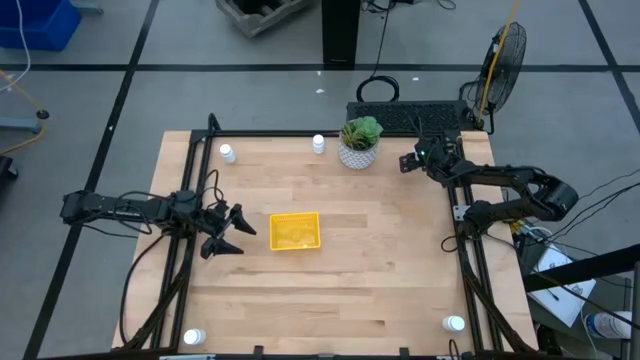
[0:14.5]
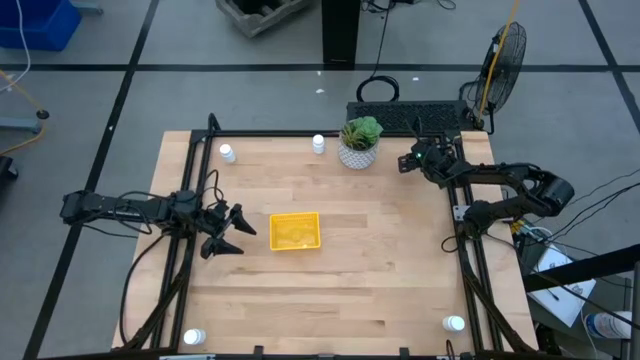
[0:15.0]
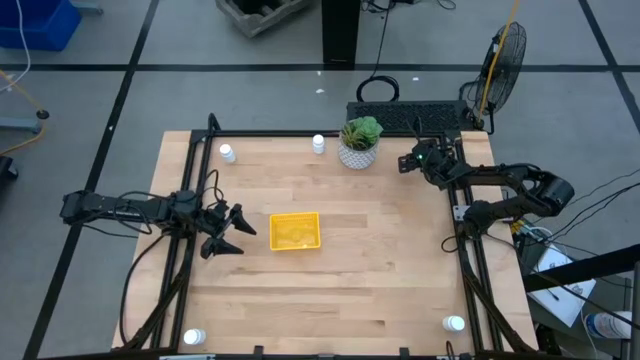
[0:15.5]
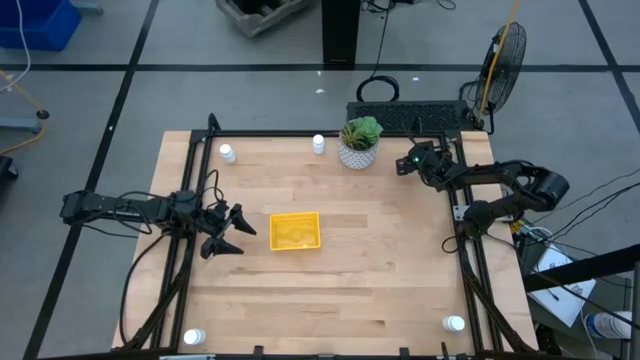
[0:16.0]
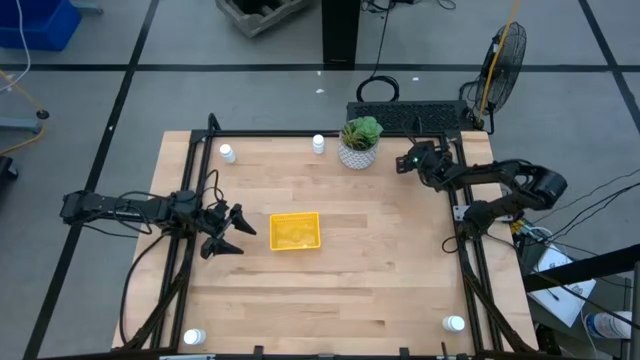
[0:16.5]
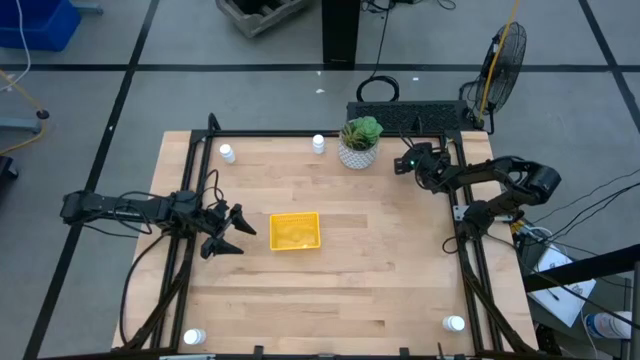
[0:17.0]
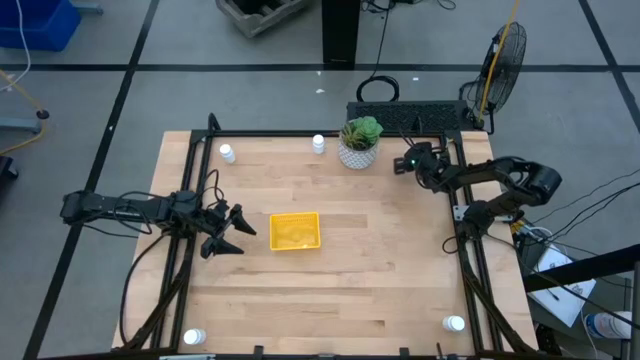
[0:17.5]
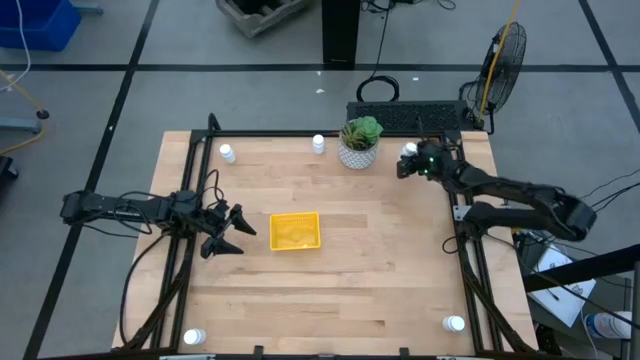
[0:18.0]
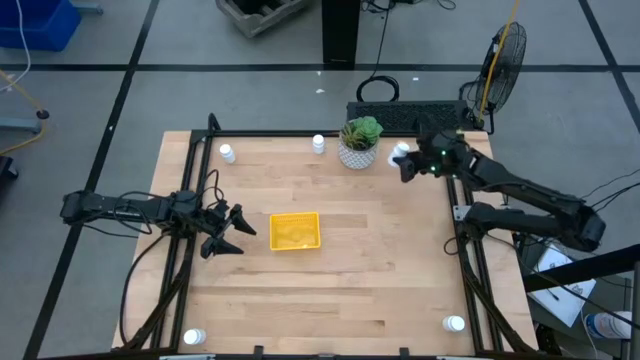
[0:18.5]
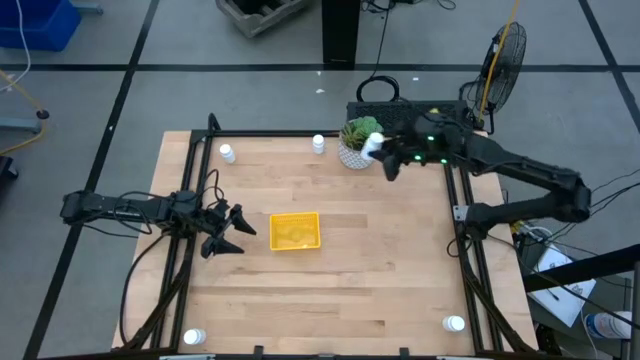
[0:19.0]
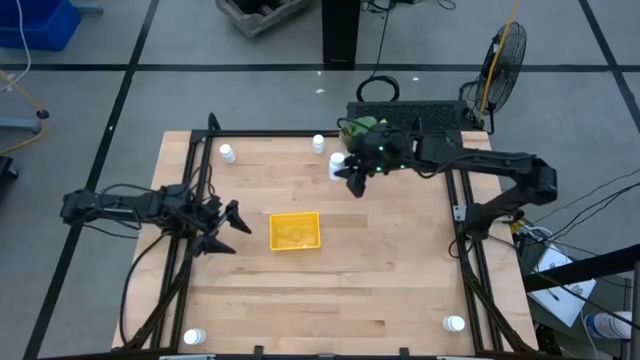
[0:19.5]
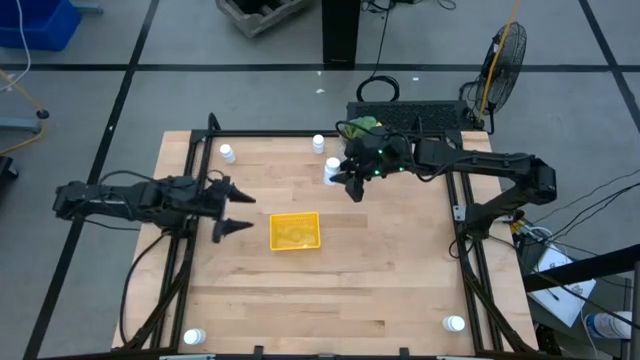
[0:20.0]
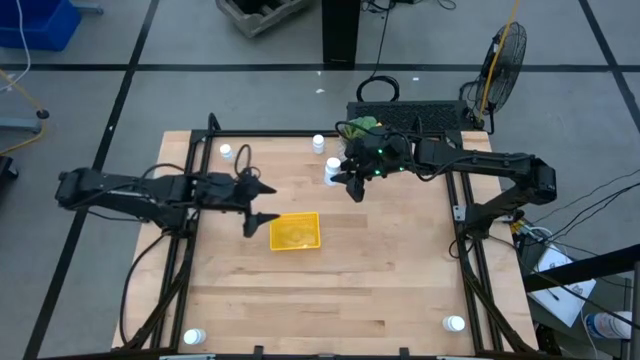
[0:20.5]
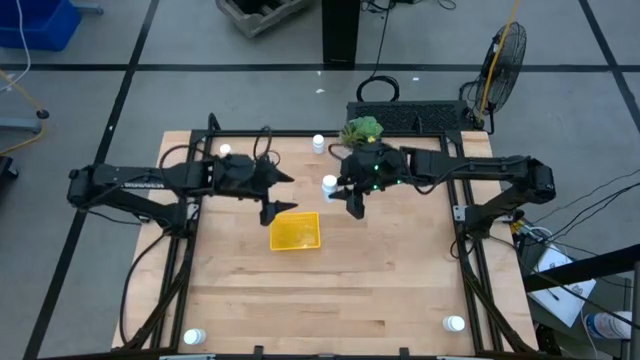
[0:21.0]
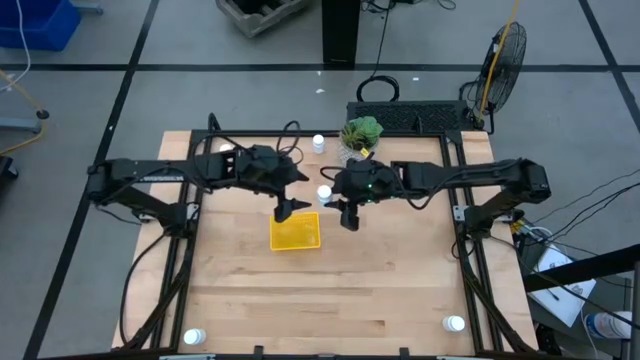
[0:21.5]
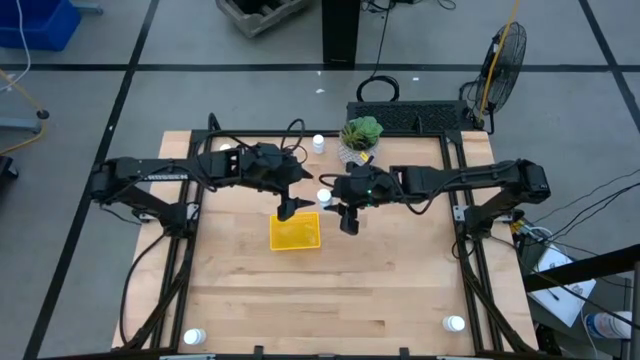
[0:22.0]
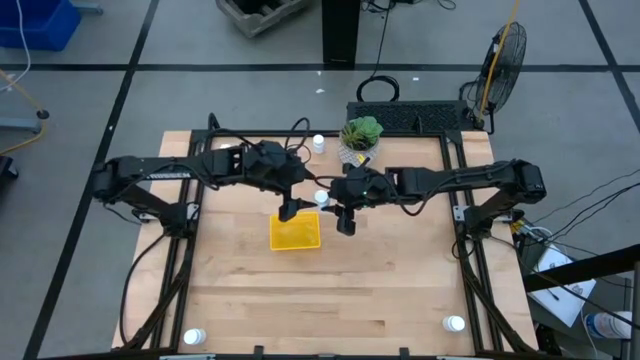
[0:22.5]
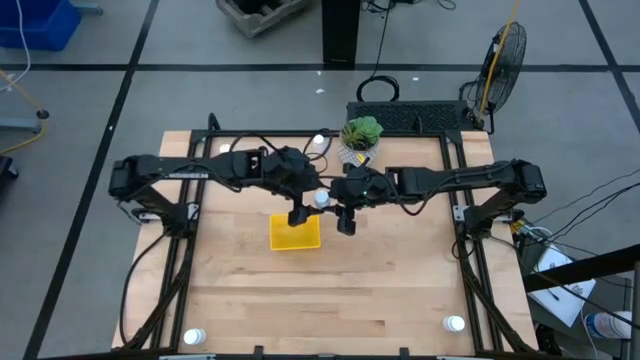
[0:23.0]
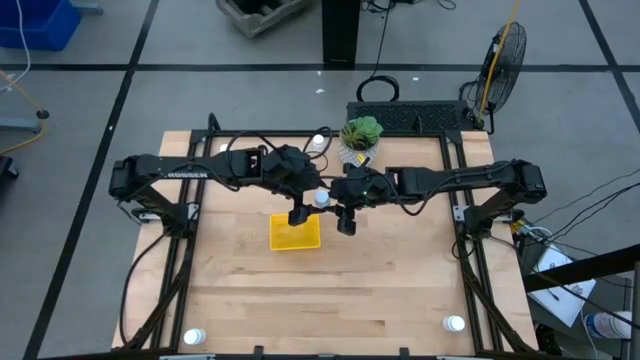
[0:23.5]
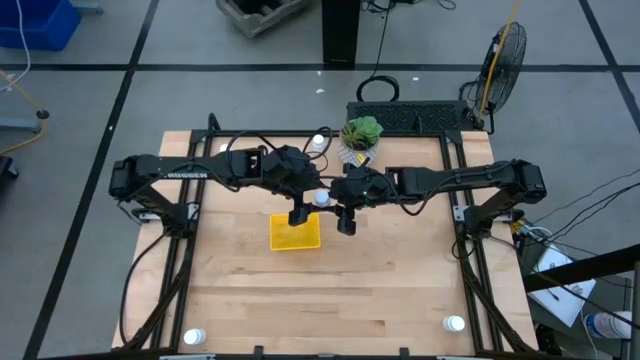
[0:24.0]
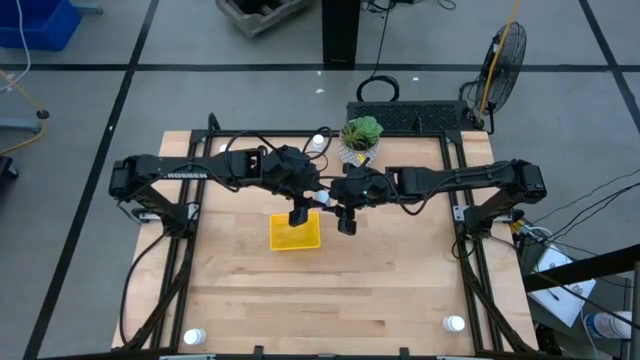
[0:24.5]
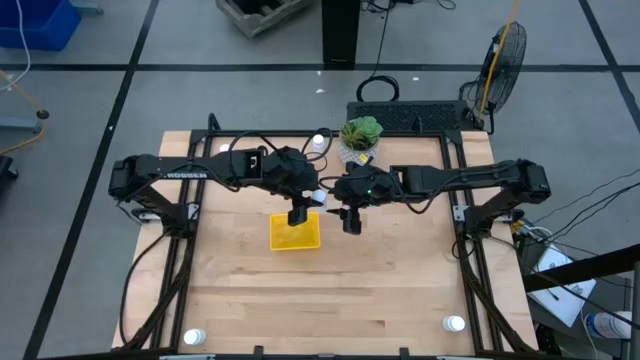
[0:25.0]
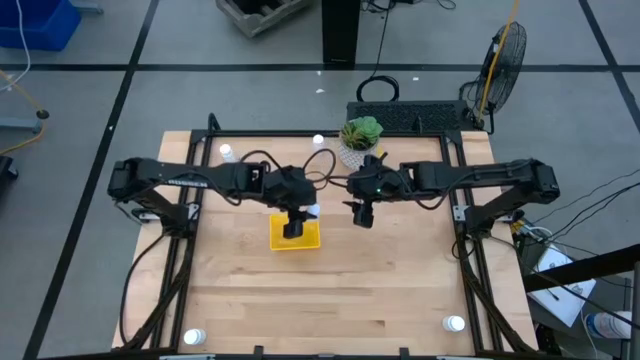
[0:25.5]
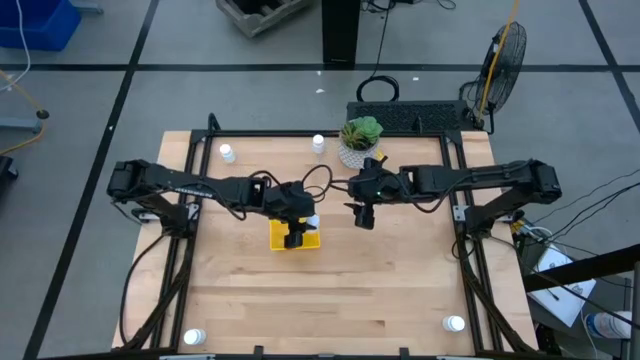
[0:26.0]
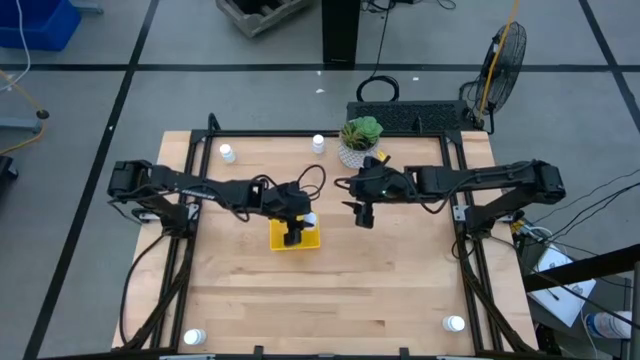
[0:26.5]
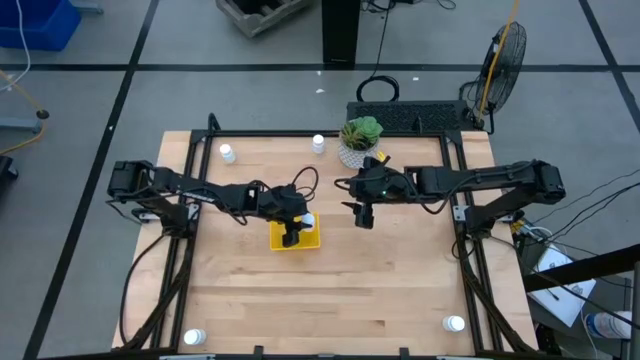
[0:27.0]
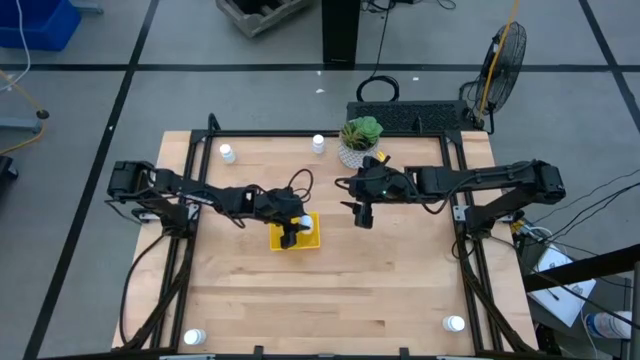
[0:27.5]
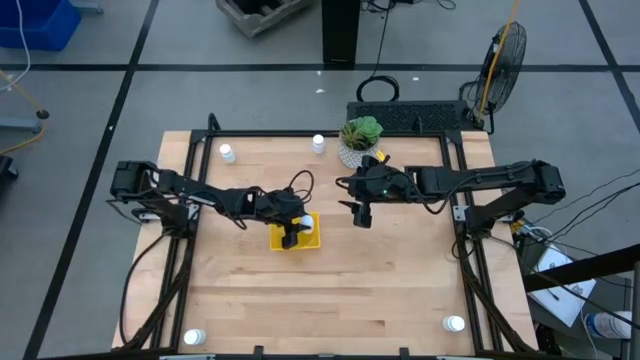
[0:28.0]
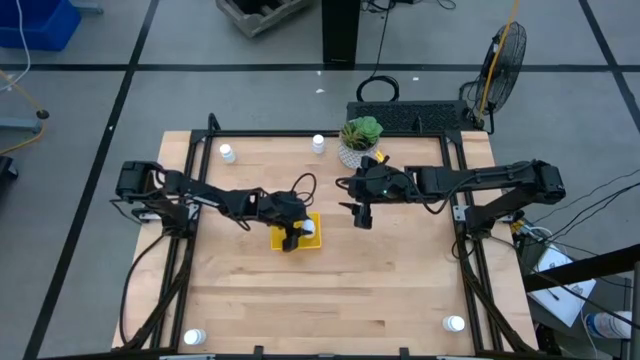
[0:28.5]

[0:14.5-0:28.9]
Task: Pick and place pill bottles into a basket
Put the white pill bottle into the yellow bin

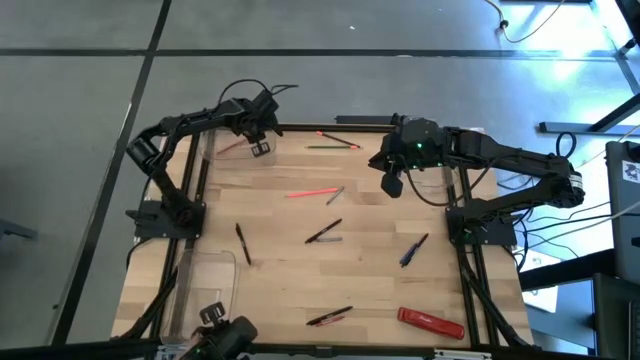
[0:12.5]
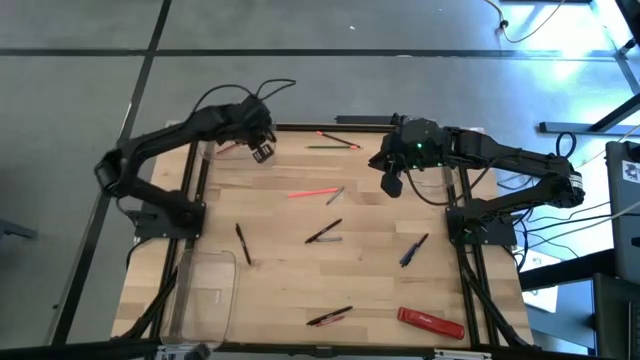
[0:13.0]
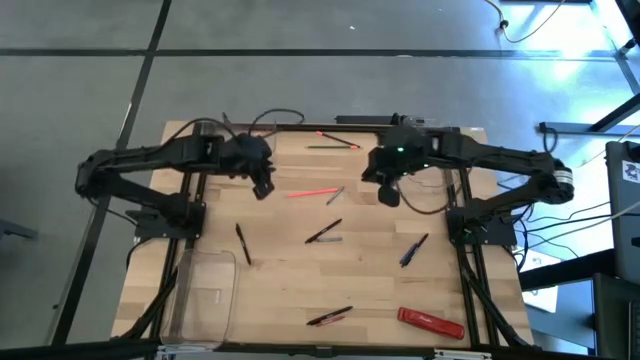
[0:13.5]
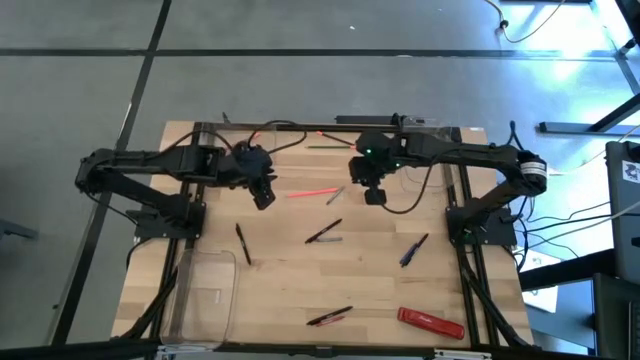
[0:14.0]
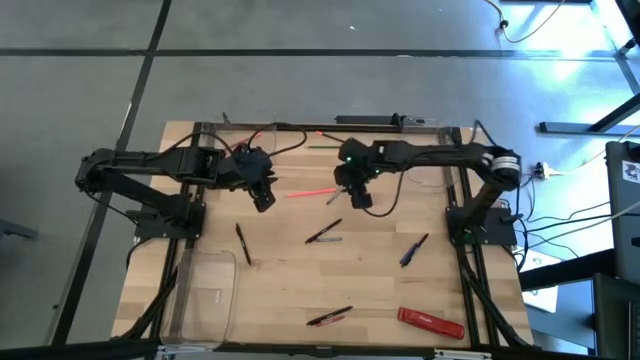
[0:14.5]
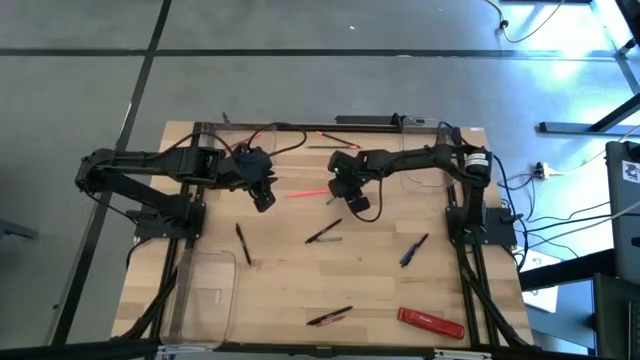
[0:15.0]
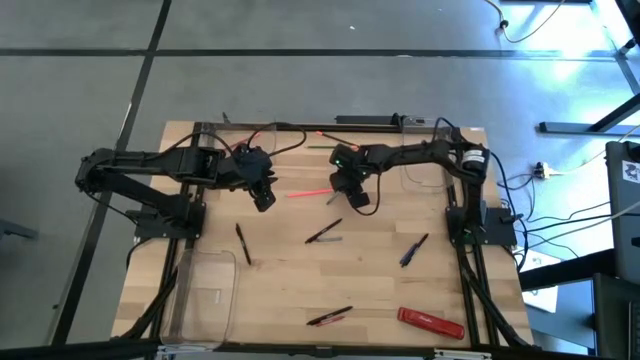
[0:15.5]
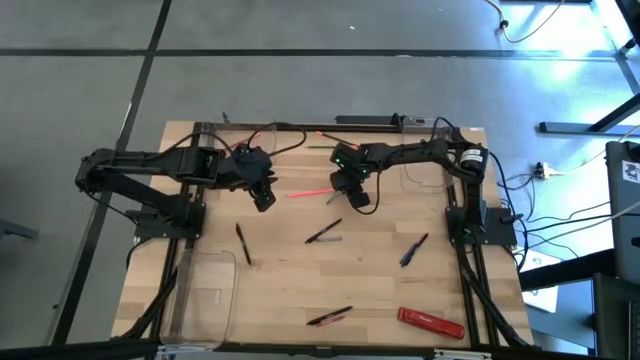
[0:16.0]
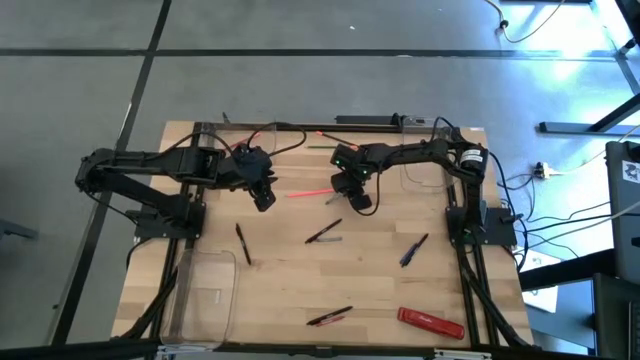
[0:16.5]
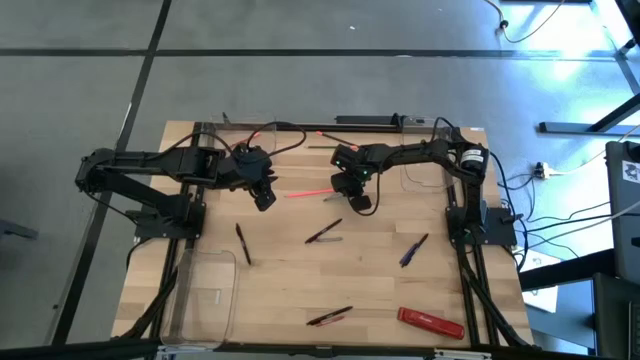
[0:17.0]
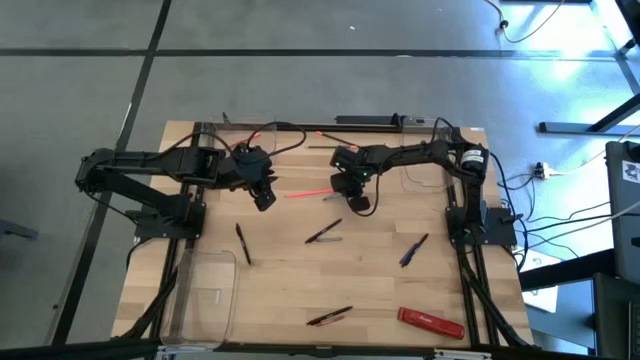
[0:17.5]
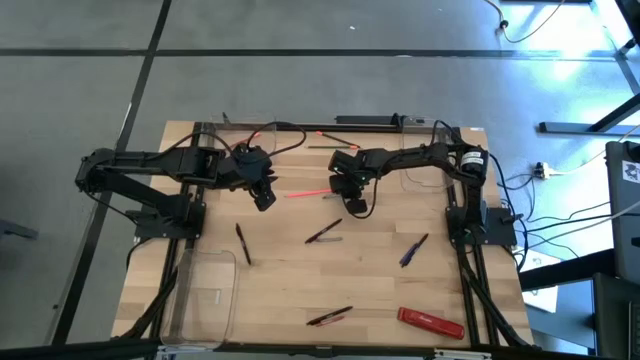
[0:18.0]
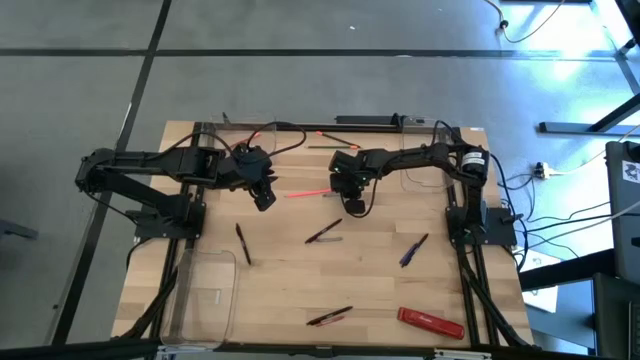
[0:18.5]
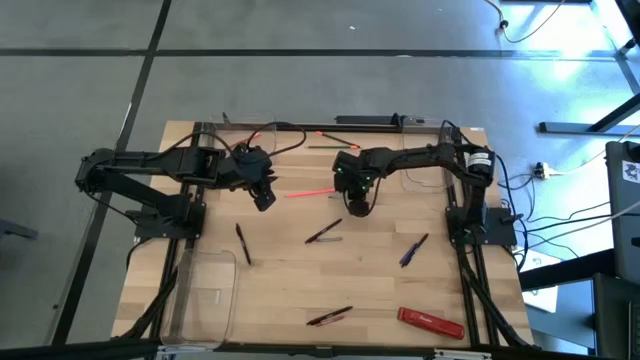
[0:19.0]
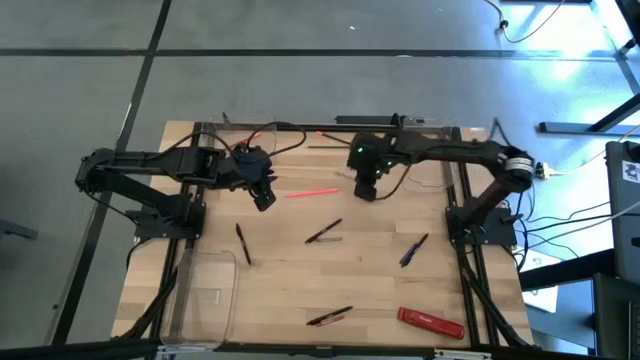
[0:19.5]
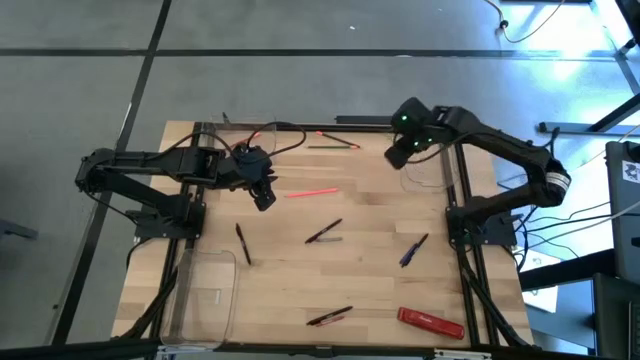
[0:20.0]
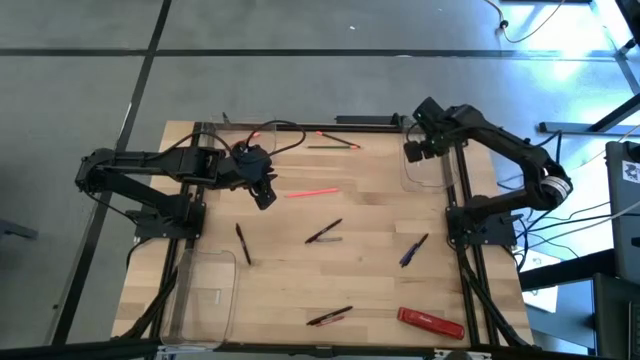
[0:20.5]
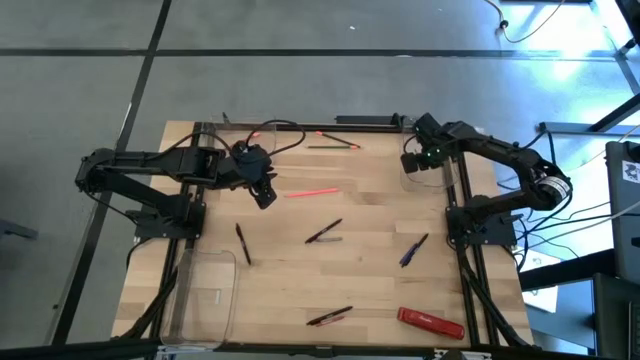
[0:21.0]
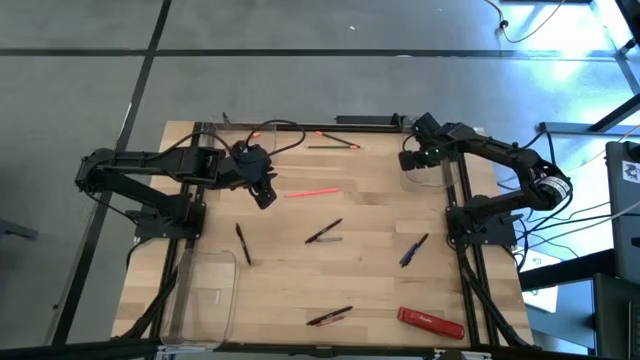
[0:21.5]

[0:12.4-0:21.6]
Task: Sort crayons/erasers/pens/pencils in bins
Put the gray crayon into the top right transparent bin
